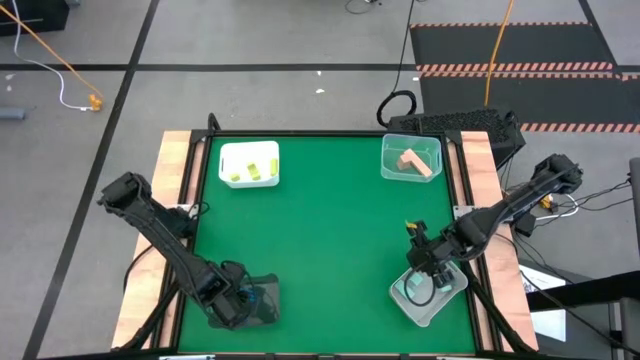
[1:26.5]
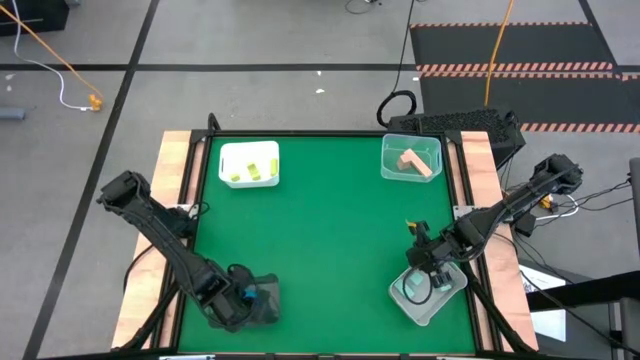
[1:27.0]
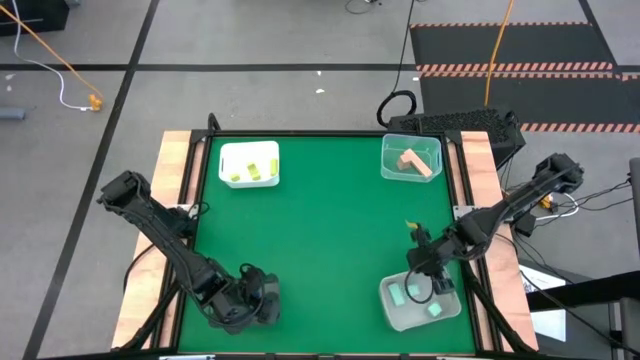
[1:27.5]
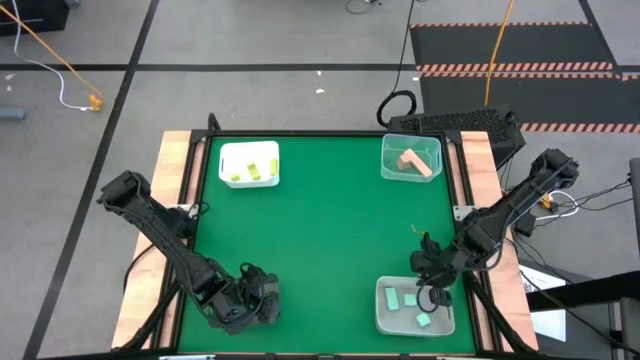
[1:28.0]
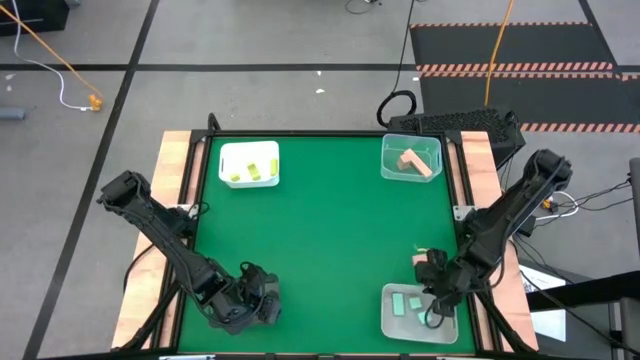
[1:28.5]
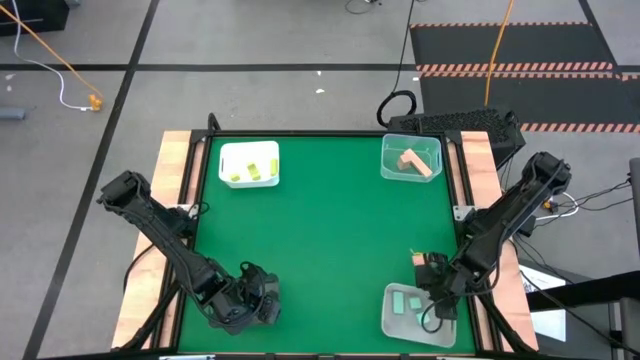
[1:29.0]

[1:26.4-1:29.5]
Task: Sort & place blocks by color
Adjust the gray bin

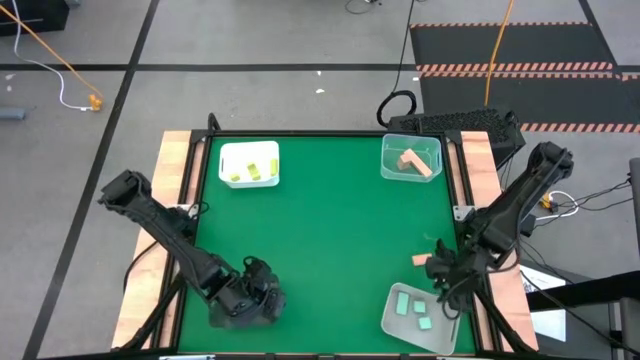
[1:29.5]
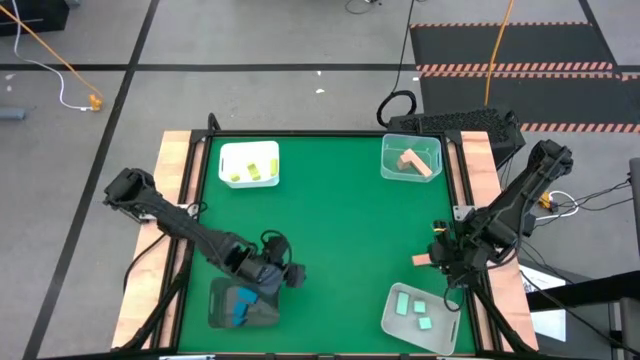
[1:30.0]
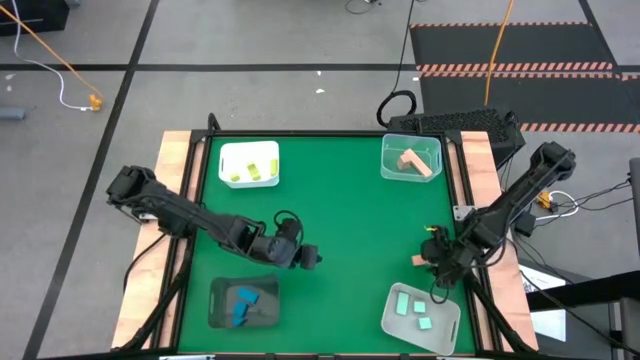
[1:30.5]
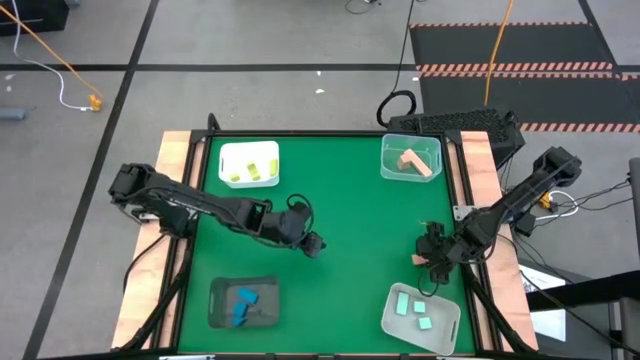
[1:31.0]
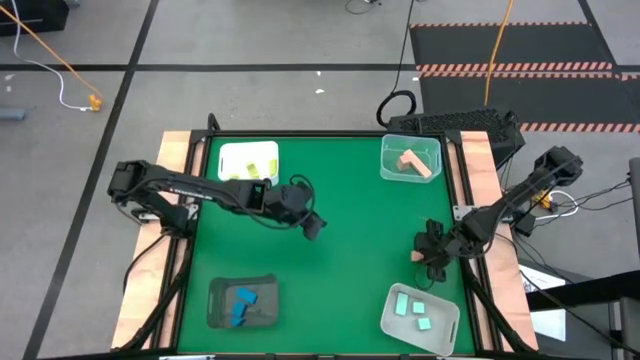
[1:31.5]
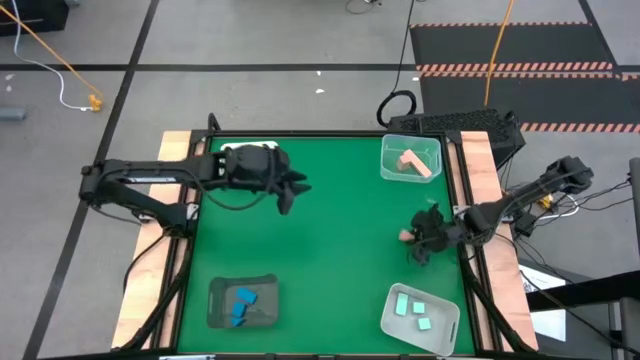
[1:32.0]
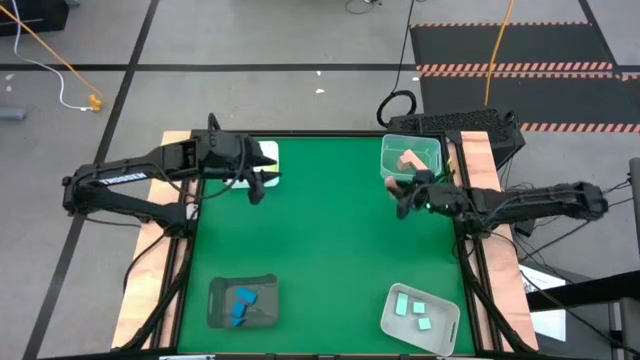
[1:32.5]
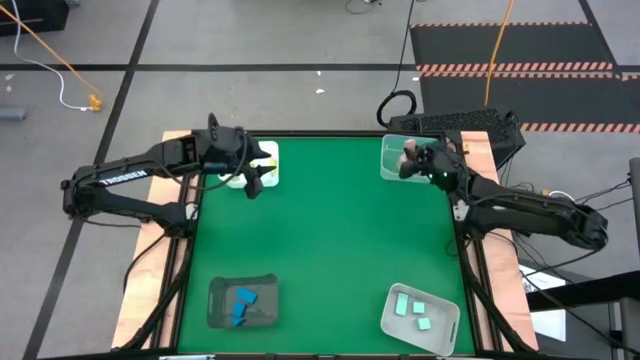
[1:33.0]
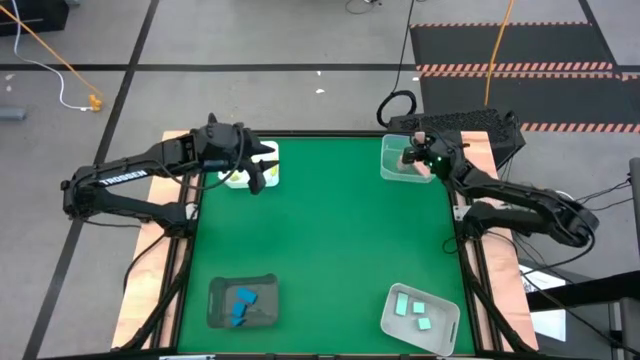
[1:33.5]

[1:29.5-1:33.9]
Put the light brown block into the transparent bin

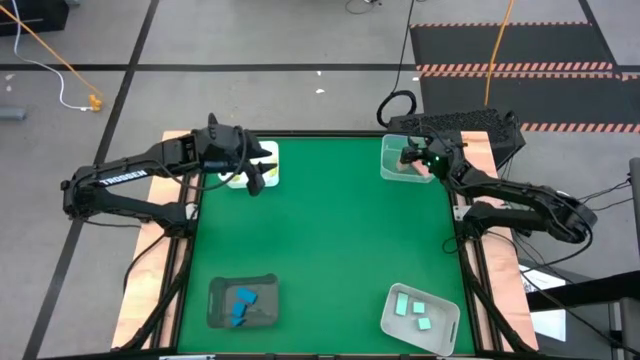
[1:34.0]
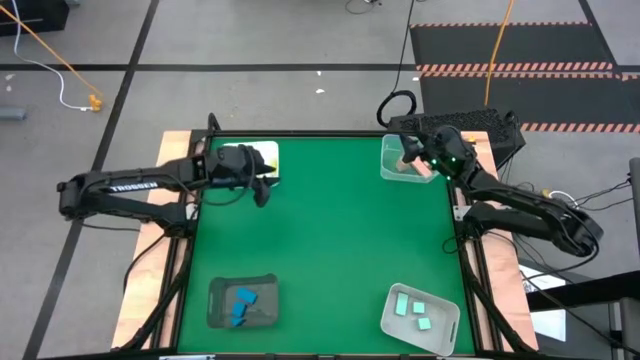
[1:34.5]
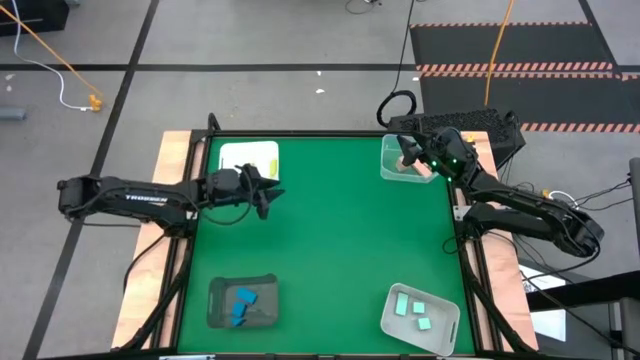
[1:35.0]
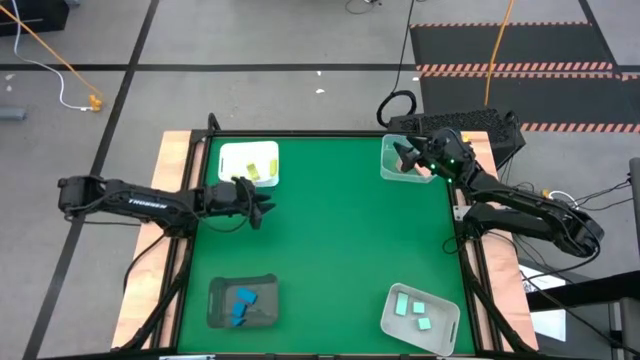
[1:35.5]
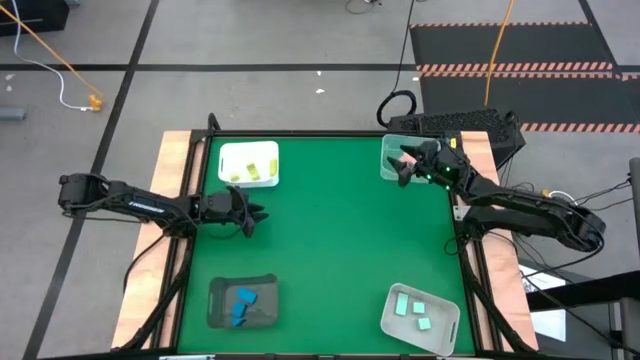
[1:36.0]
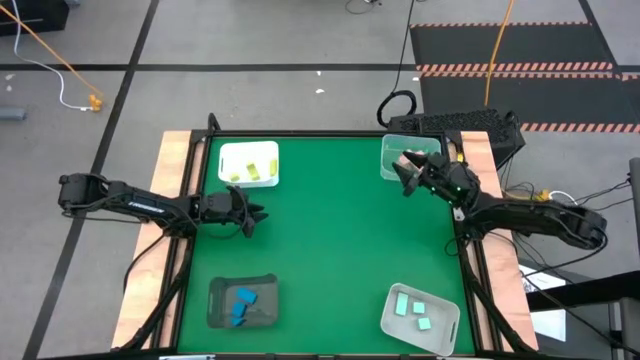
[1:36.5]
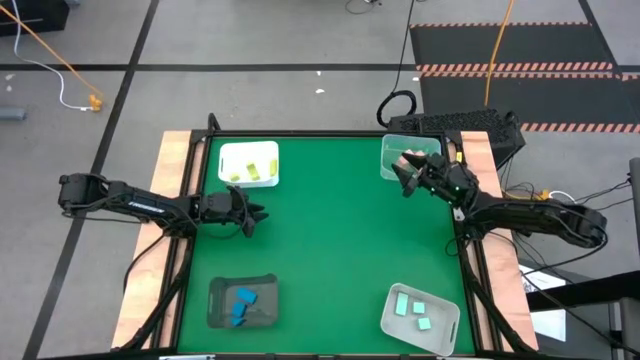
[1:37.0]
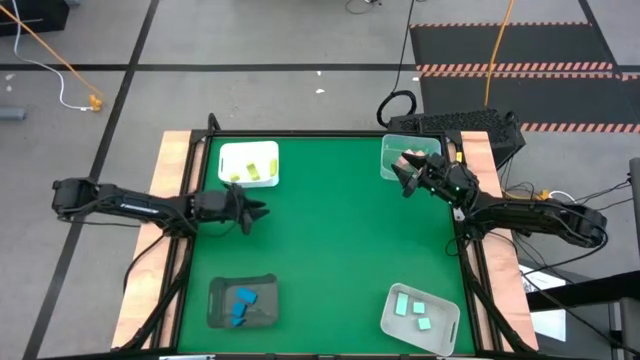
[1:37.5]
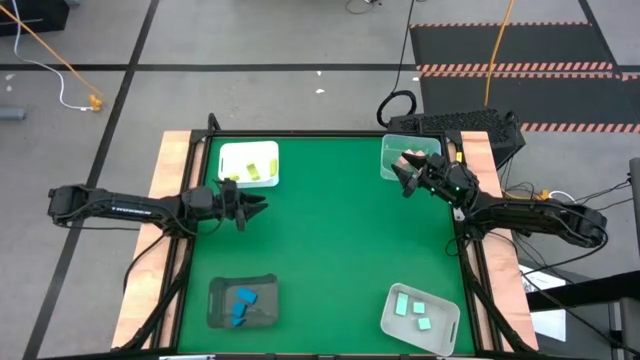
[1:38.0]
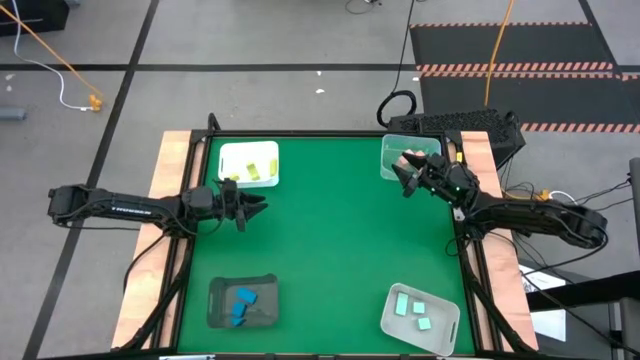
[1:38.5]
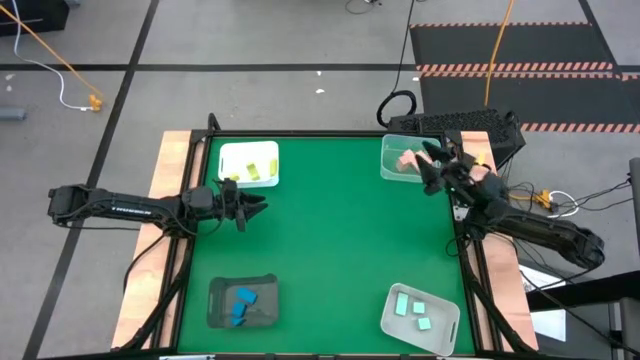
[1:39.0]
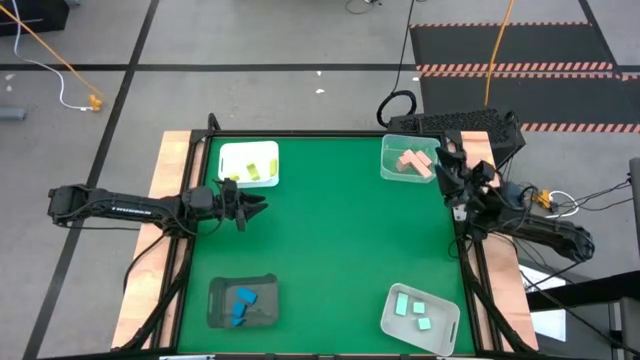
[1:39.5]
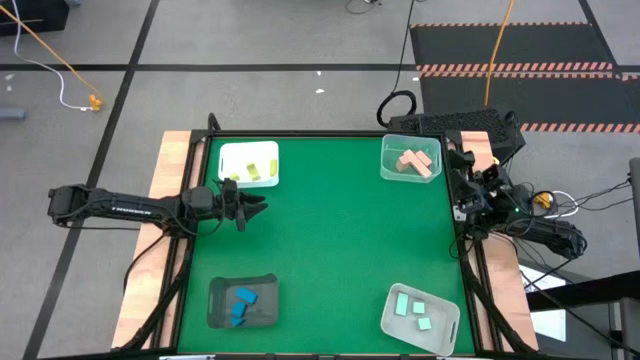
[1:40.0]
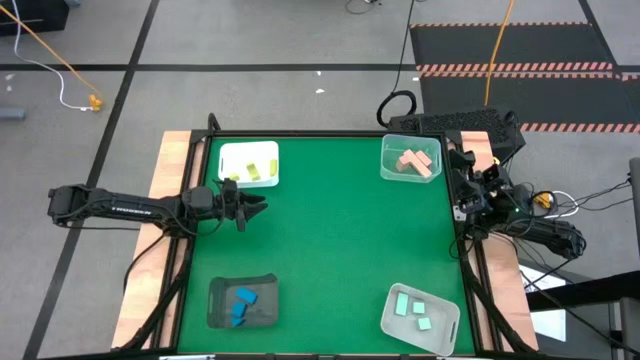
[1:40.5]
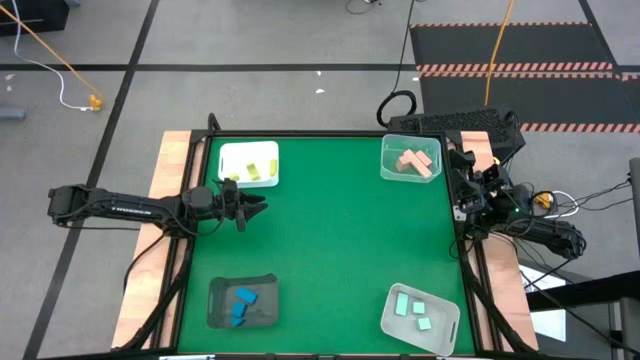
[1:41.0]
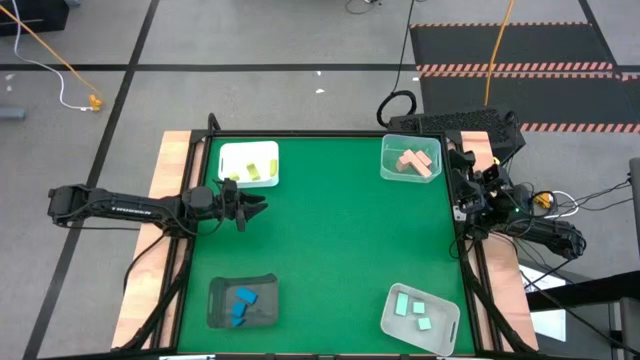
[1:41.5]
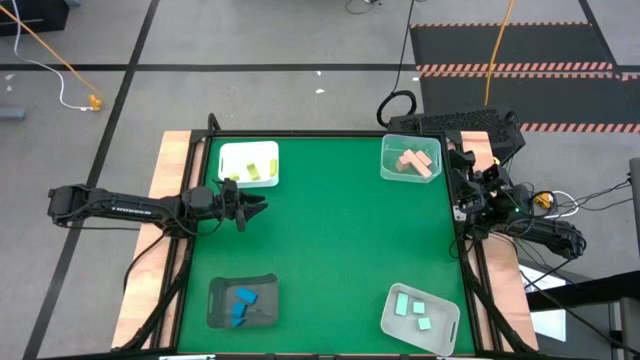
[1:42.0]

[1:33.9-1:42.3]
Return to Home Position

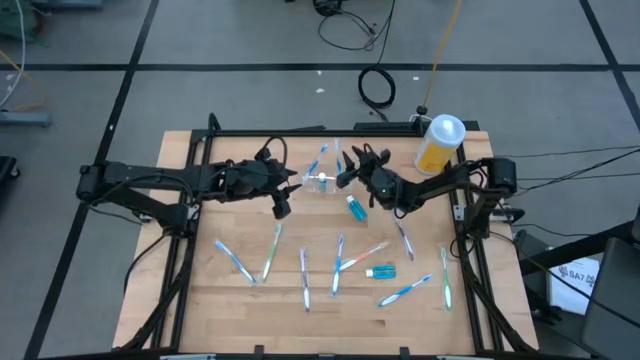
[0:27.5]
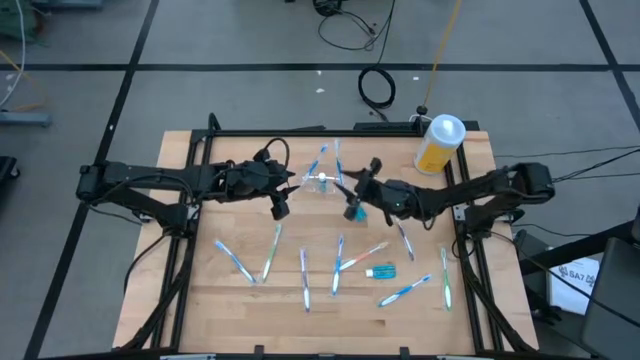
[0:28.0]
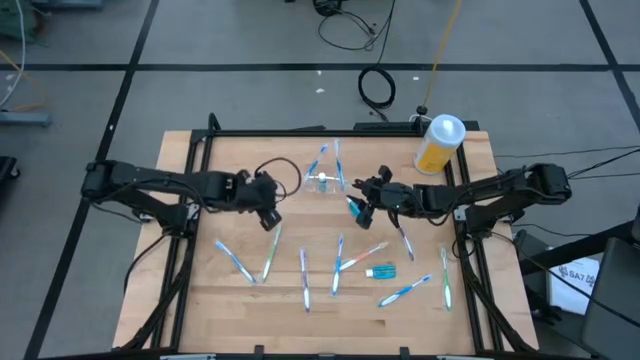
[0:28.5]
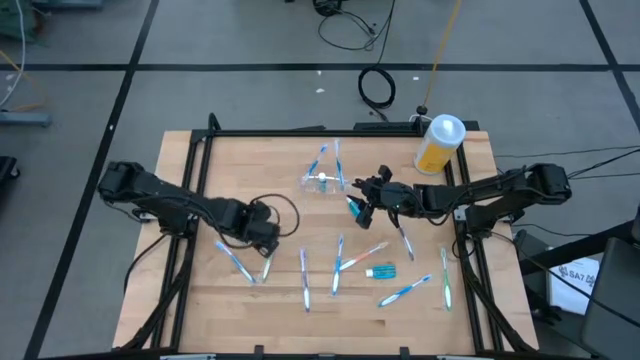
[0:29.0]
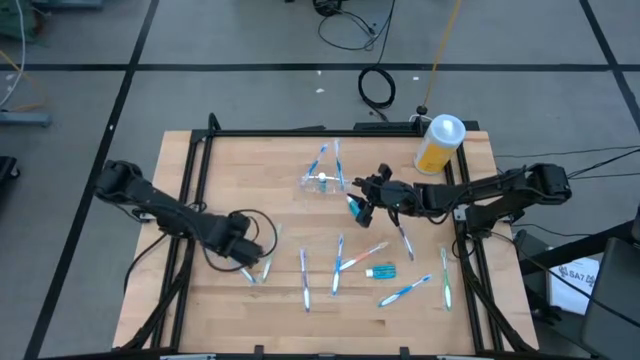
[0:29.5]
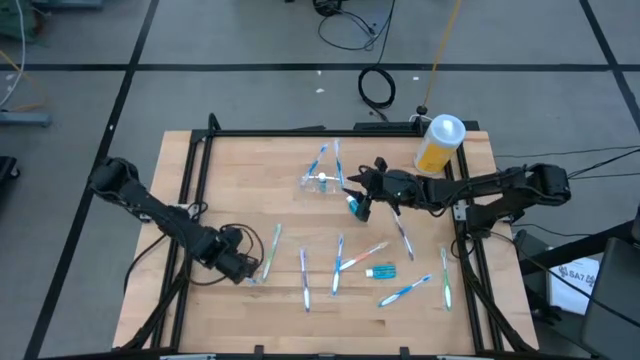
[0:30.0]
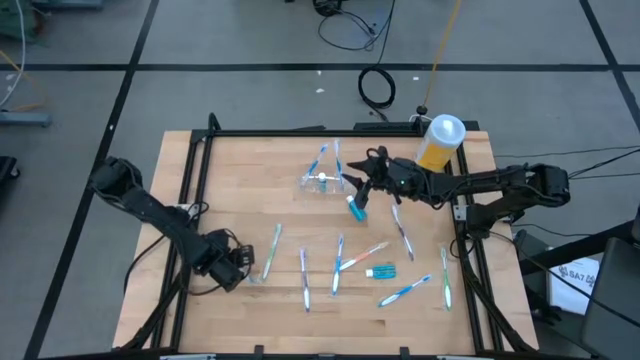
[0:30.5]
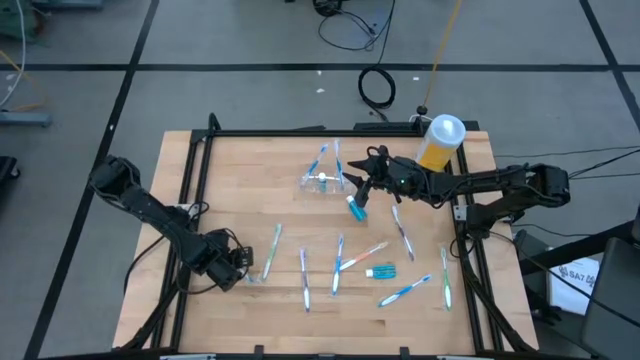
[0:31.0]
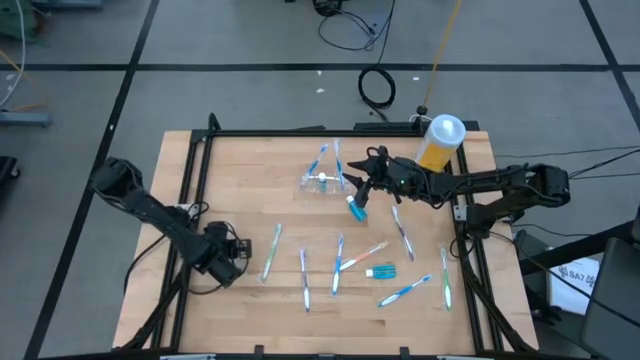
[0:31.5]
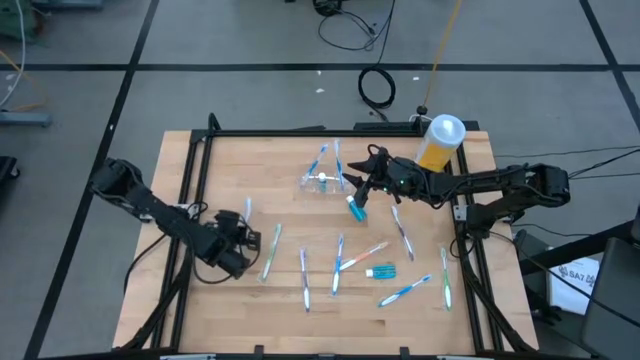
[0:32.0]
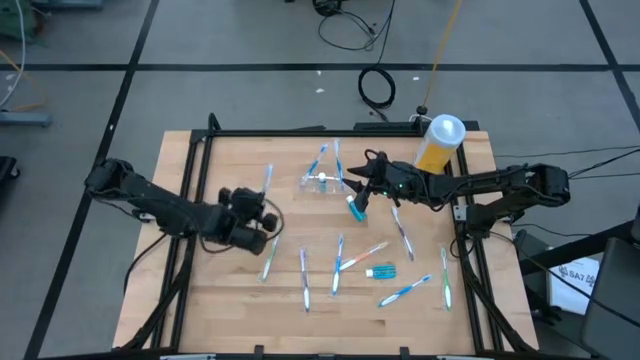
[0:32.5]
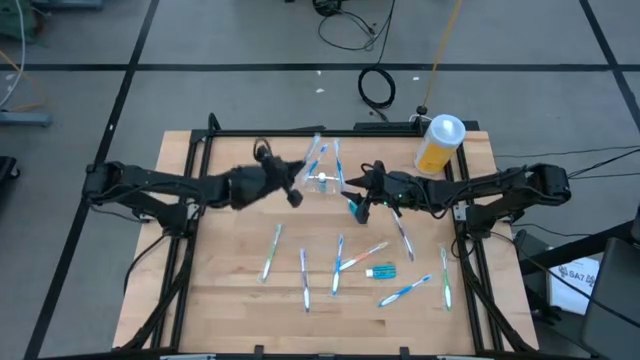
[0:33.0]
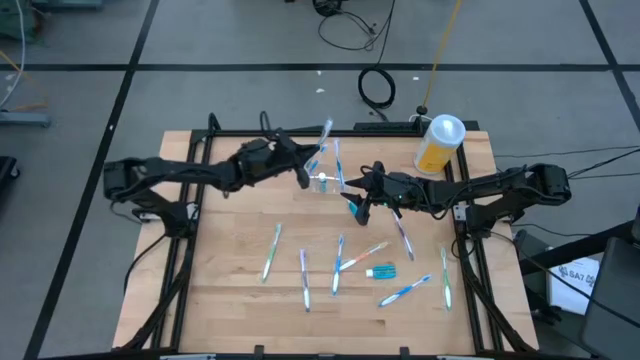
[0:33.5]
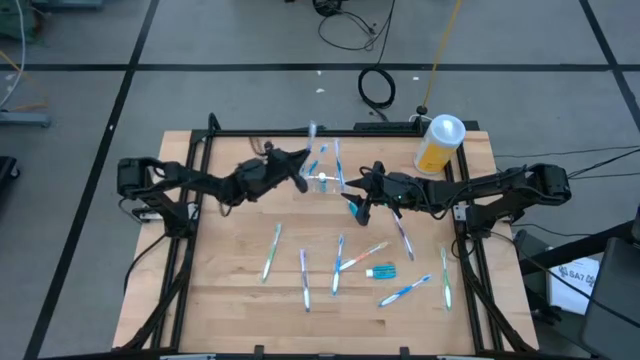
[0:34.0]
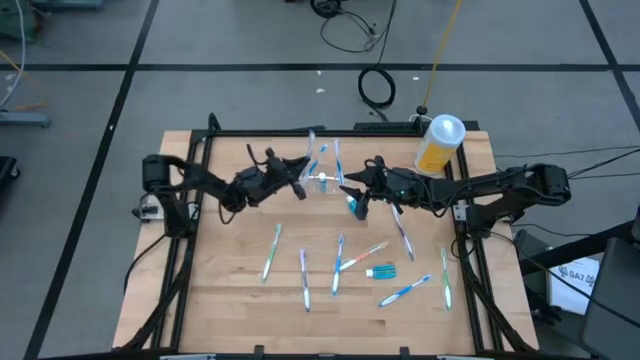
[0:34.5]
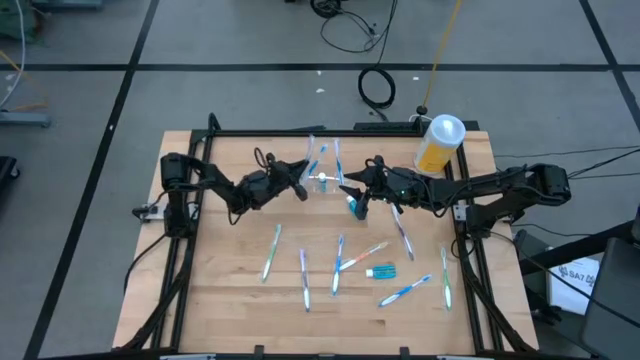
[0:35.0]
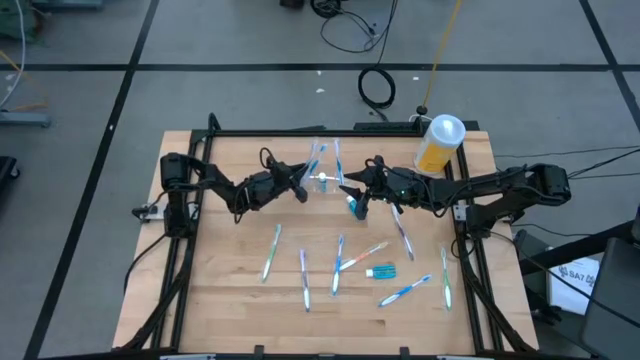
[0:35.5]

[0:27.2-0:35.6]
Task: Pick & Place toothbrushing station
Put the blue toothbrush into the transparent organizer
